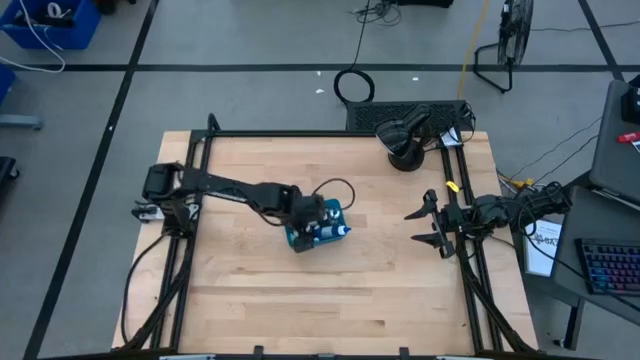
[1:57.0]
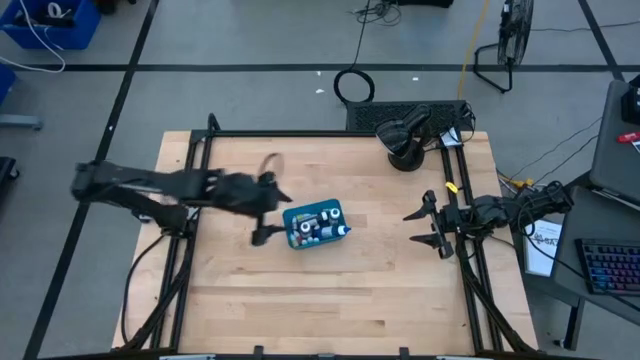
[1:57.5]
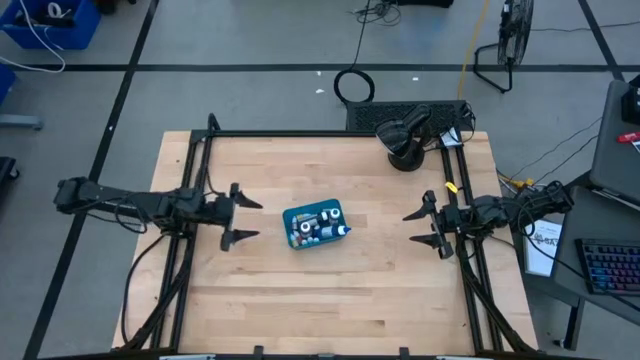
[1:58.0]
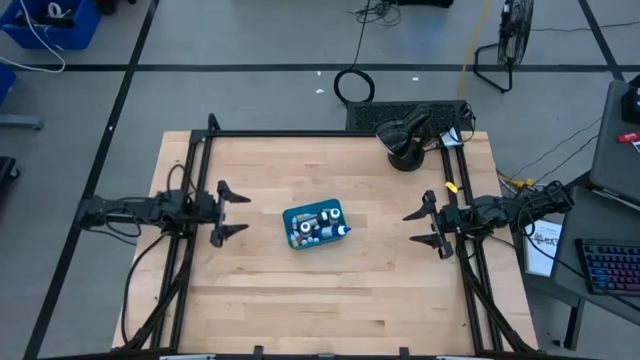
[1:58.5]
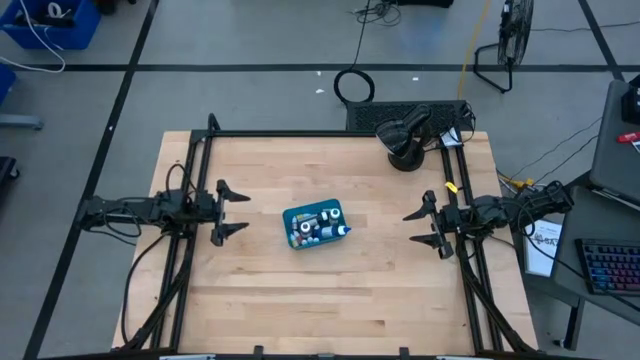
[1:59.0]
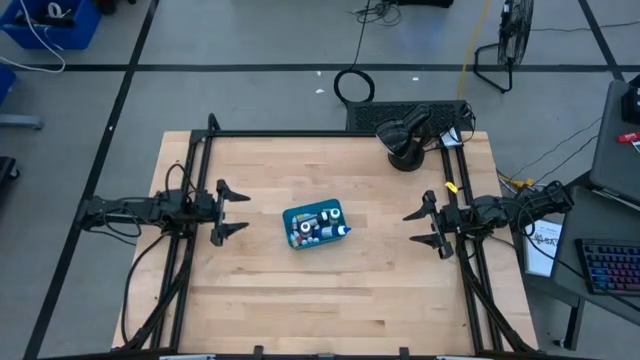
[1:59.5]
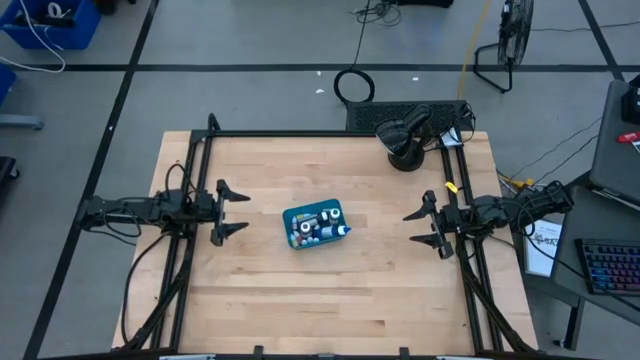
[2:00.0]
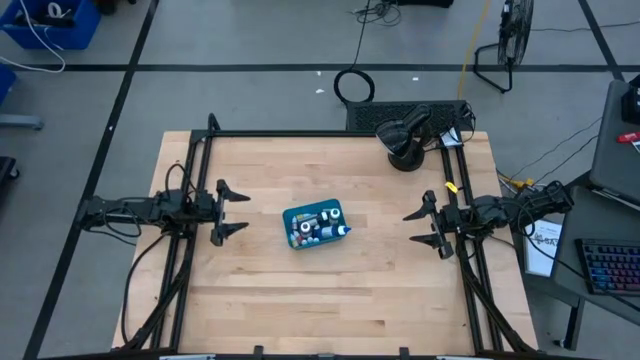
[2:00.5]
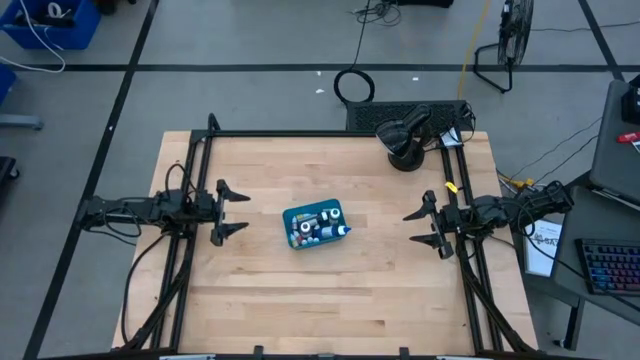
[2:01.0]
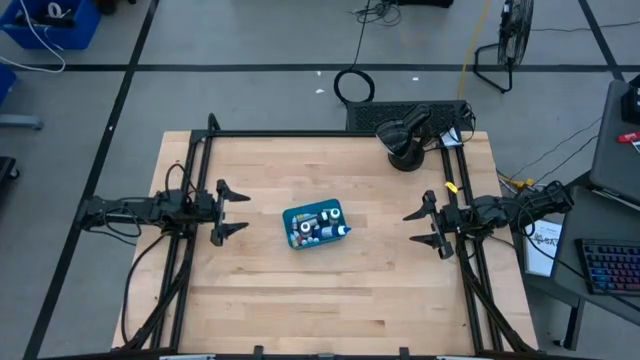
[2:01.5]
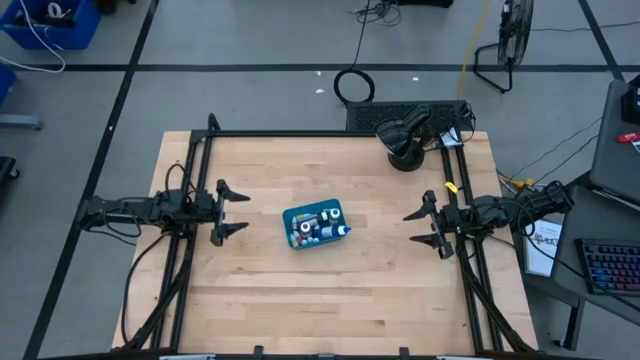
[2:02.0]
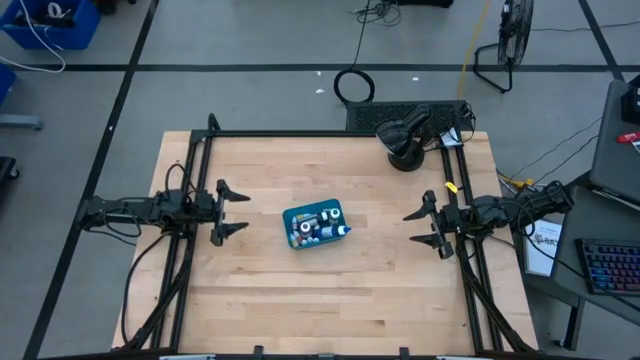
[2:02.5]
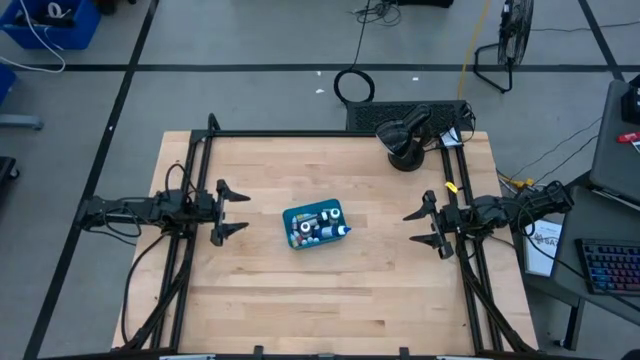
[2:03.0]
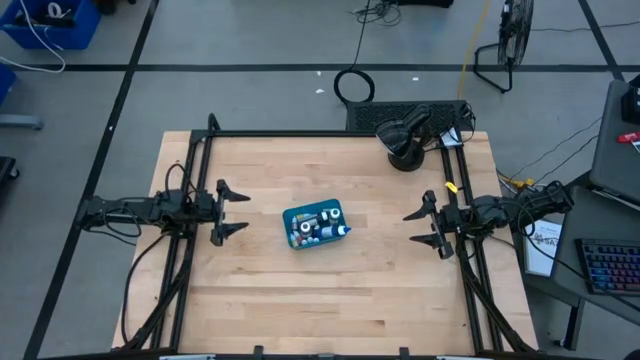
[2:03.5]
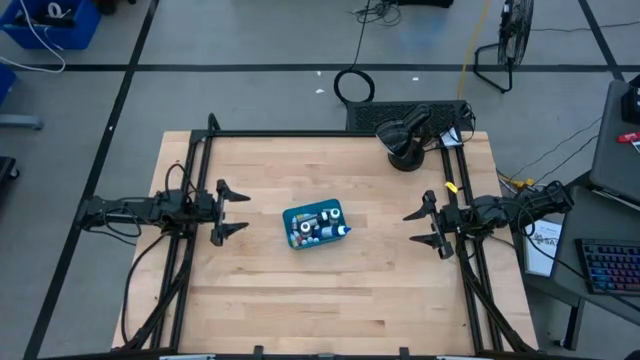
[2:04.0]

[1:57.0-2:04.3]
Task: Pick & Place food coloring
Return to Home Position

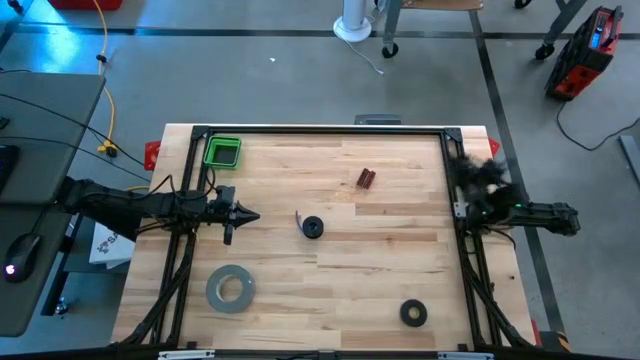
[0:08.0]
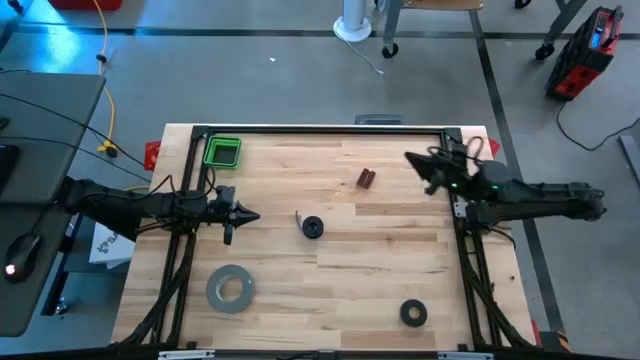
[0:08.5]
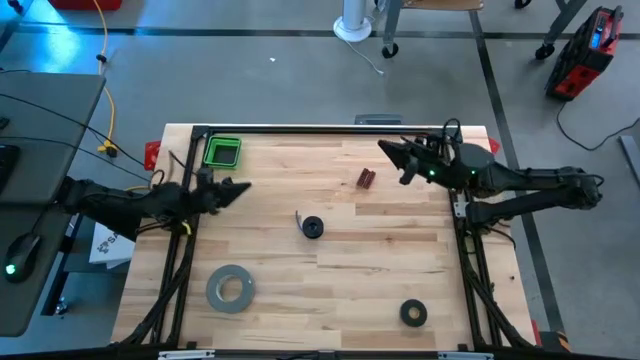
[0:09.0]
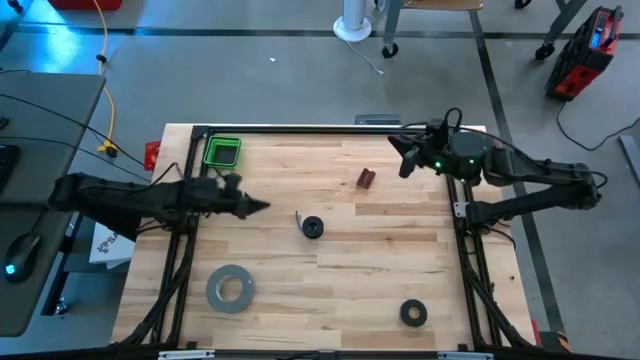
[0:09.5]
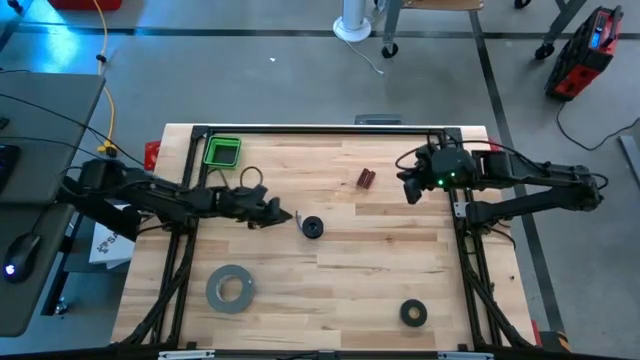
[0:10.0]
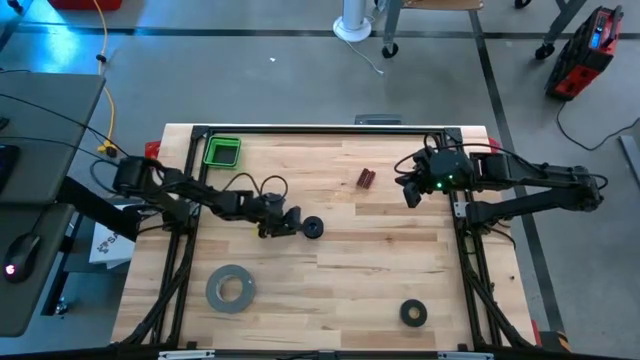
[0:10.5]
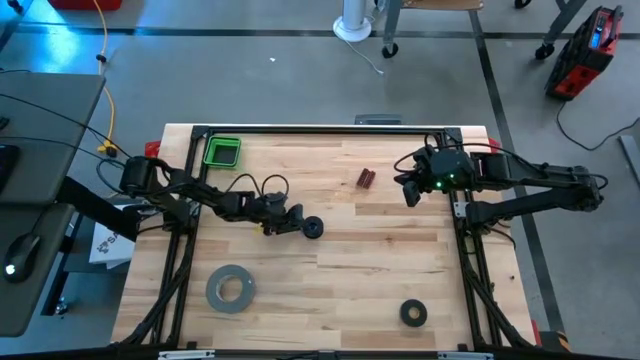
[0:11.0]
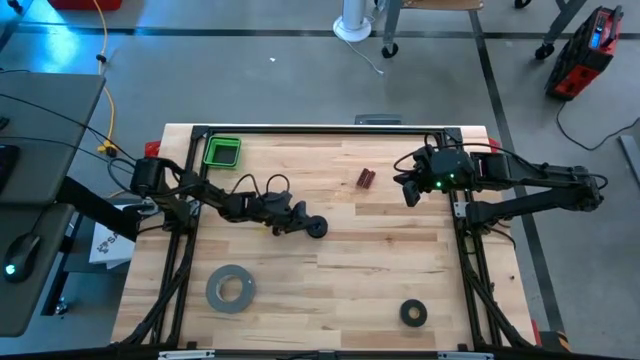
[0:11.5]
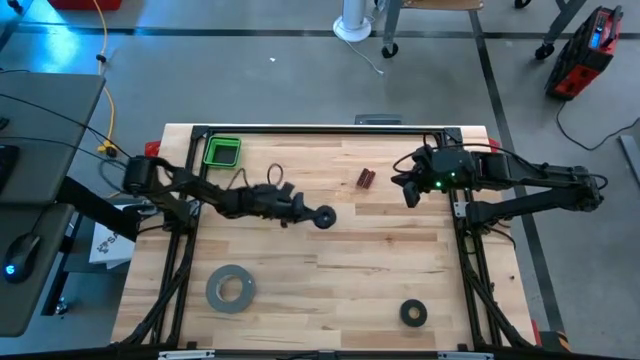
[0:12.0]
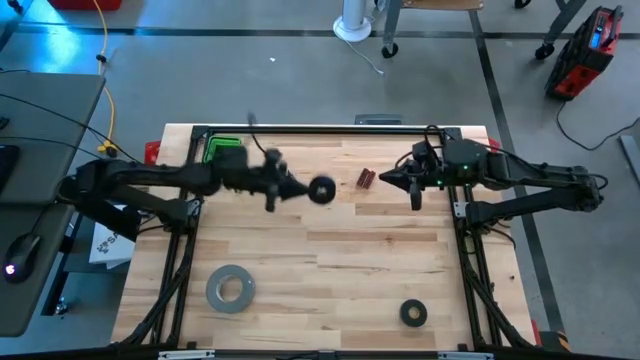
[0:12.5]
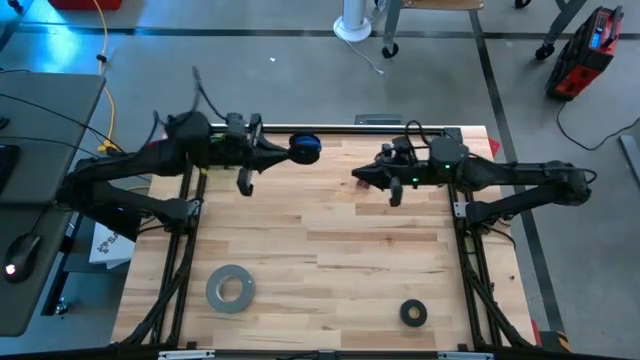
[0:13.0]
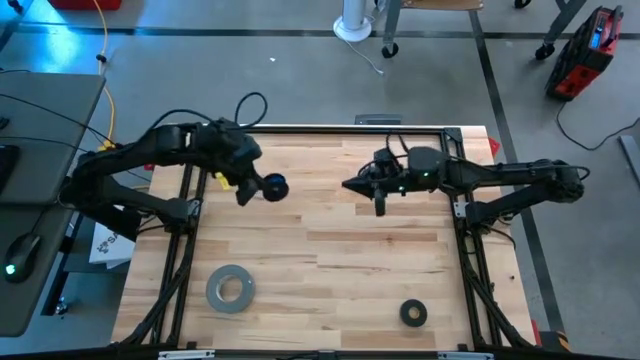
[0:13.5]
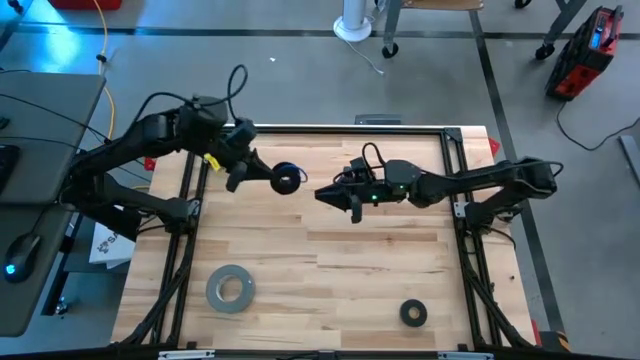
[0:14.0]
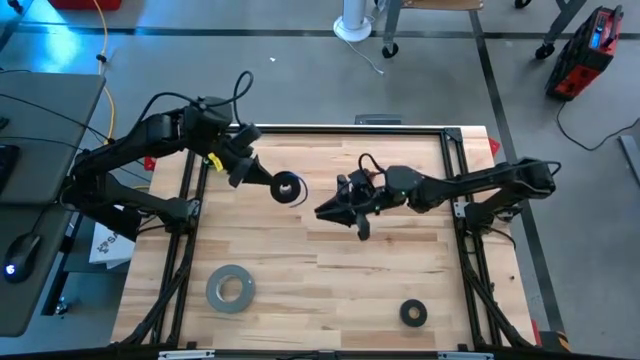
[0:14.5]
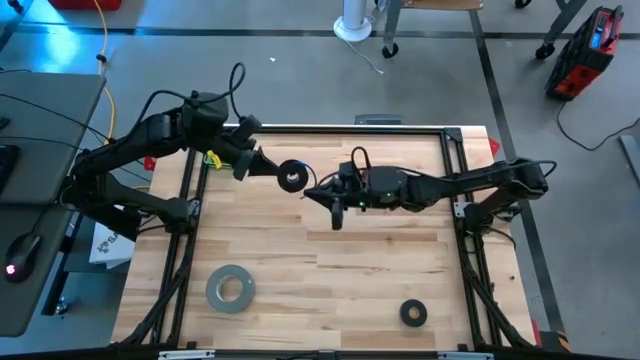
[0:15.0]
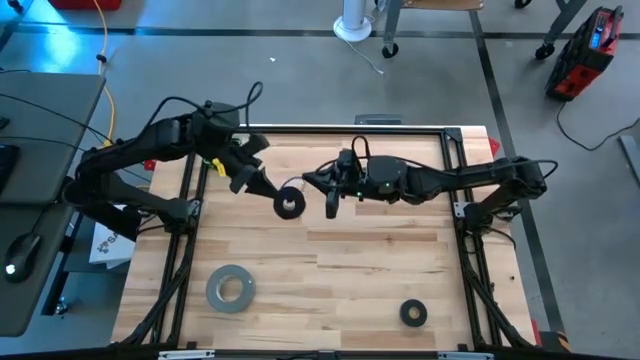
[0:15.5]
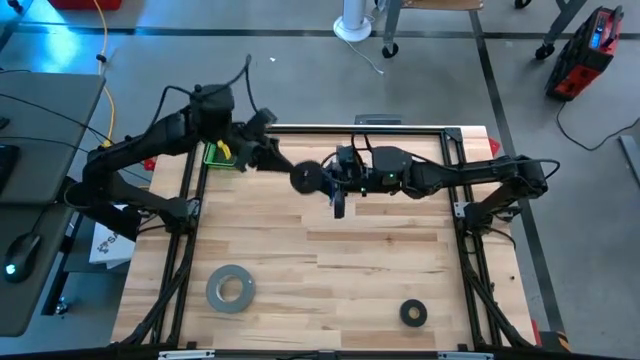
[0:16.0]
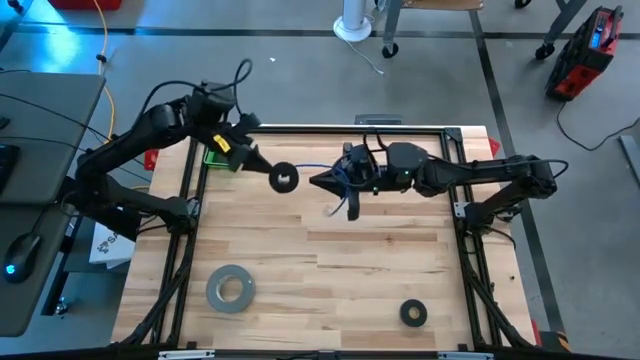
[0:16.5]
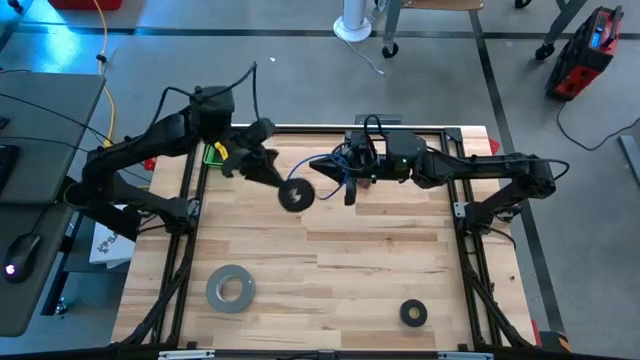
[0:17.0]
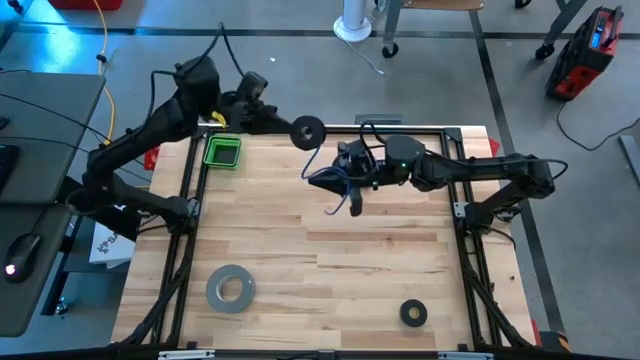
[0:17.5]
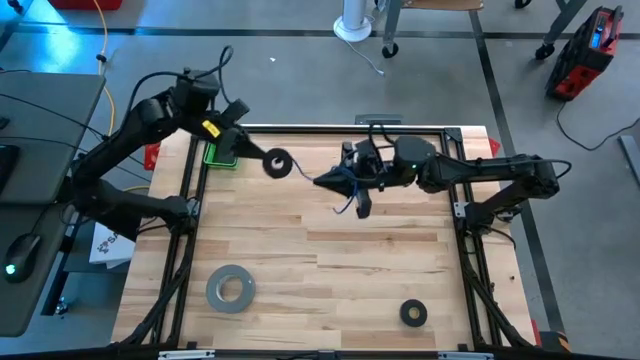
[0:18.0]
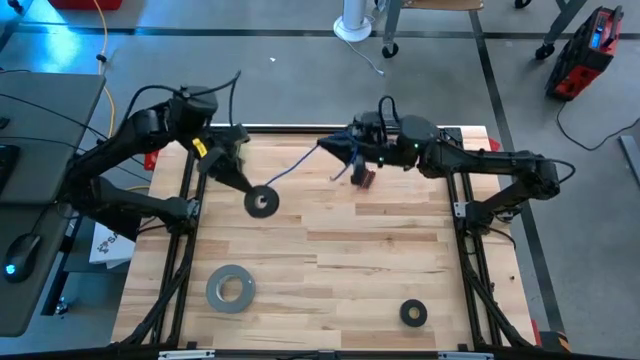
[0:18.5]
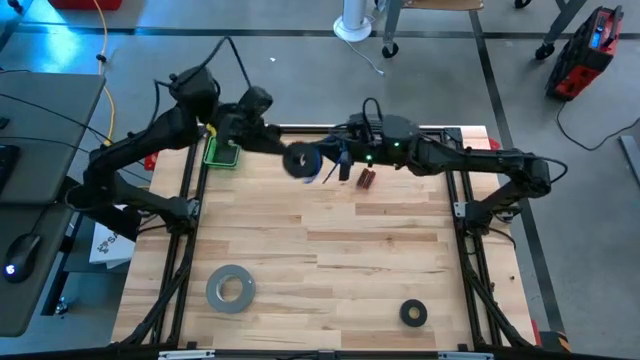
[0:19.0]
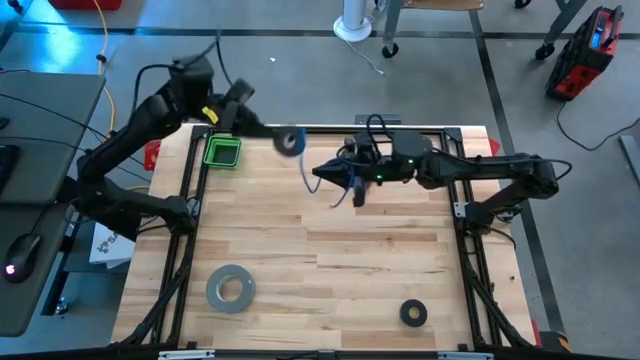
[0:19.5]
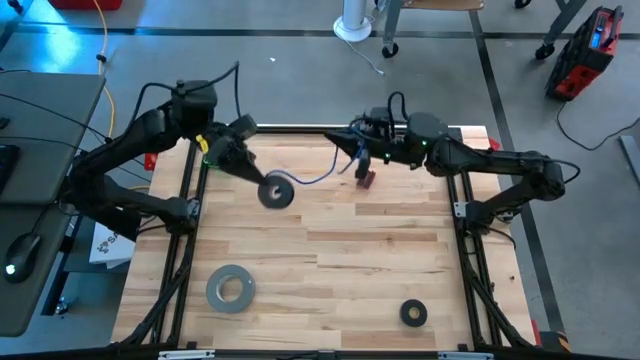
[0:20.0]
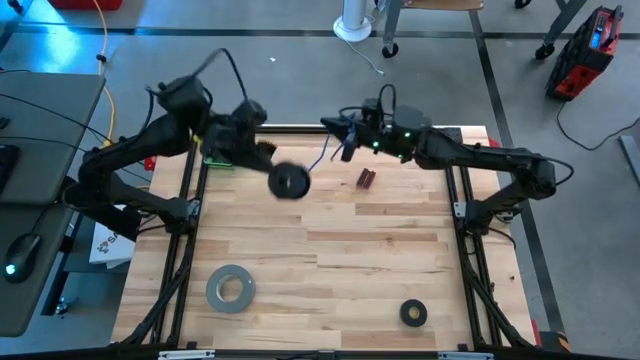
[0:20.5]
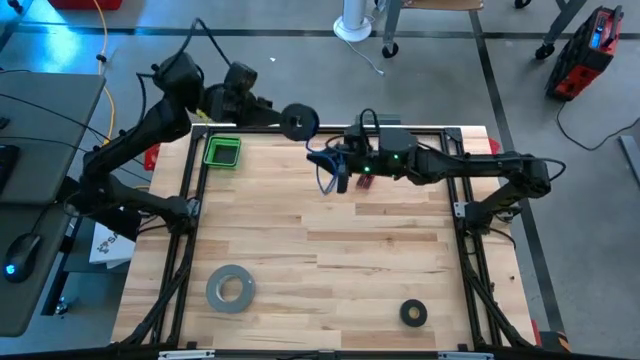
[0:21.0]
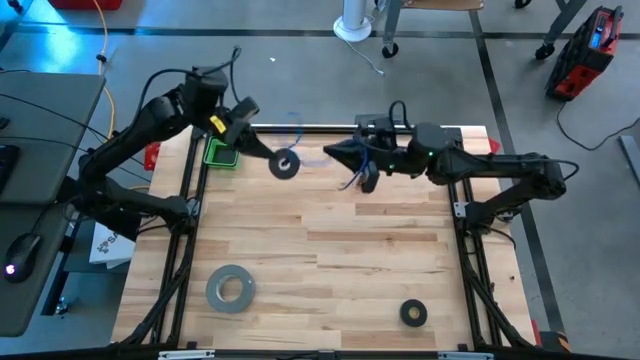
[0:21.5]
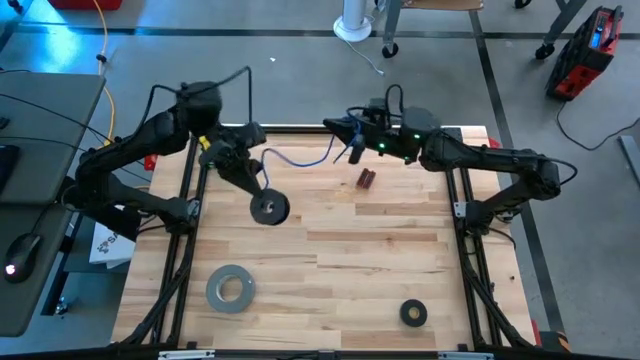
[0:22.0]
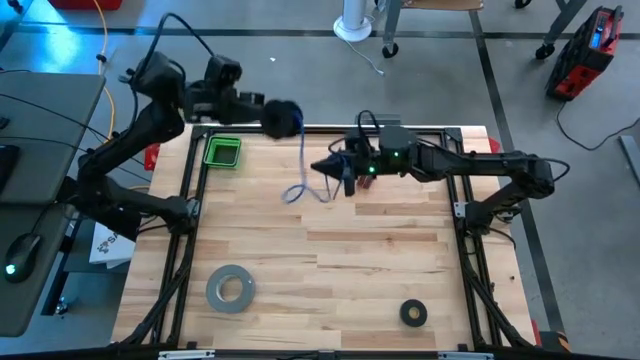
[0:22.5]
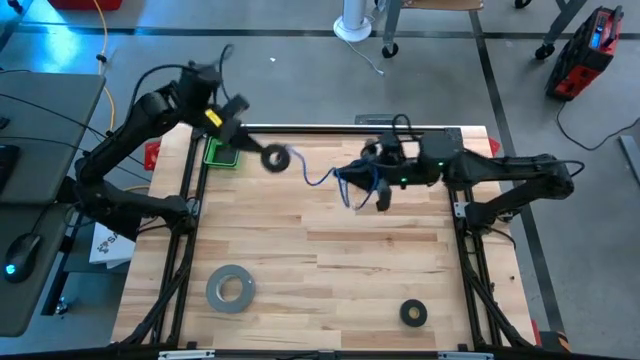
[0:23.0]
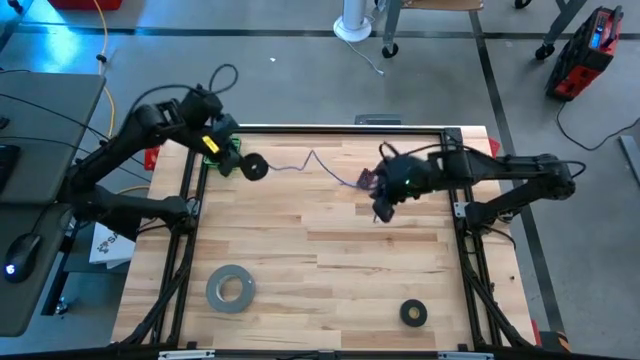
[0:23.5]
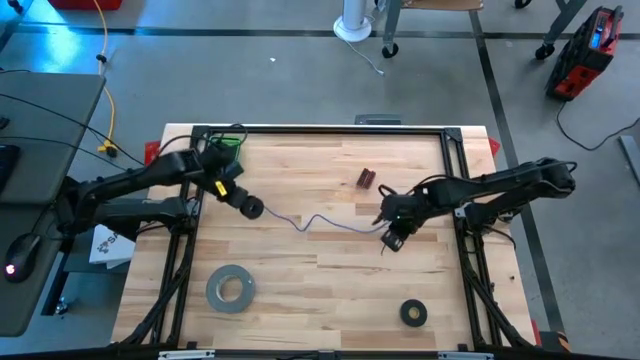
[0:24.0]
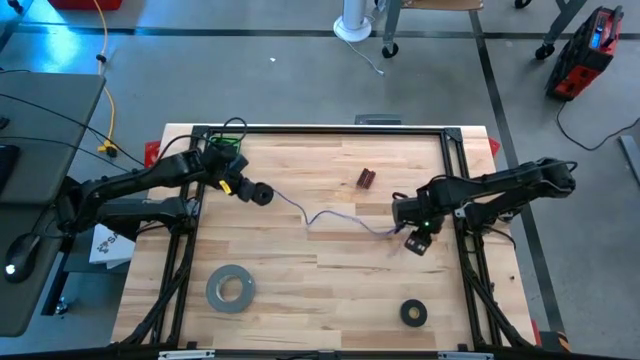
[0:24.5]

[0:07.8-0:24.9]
Task: Coil cords
Uncoil the blue wire
